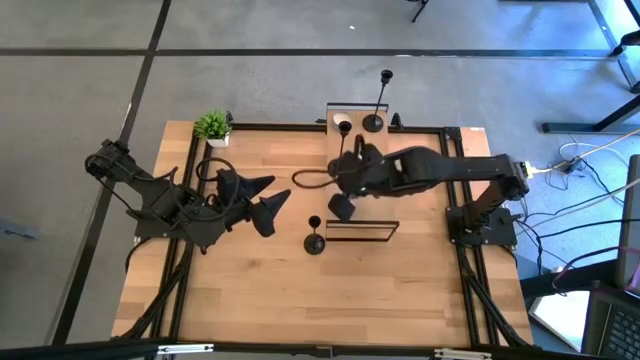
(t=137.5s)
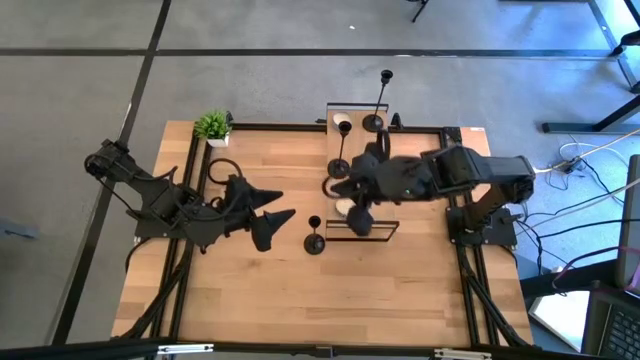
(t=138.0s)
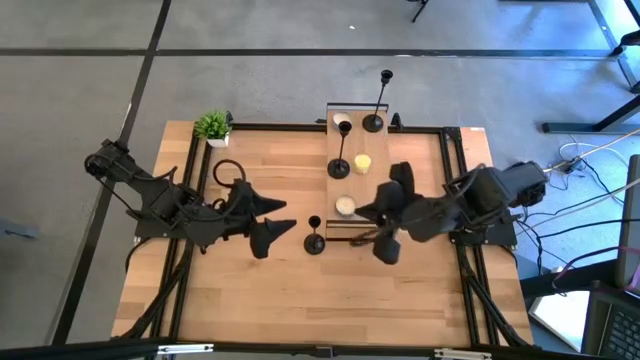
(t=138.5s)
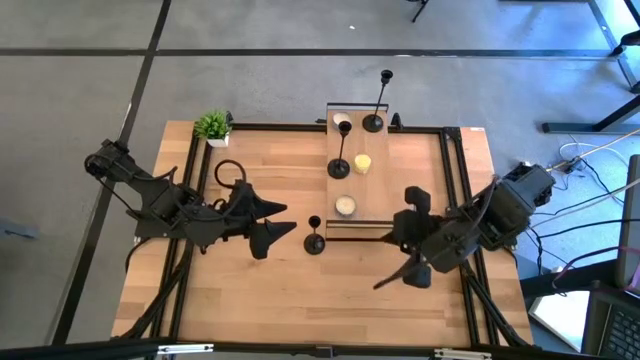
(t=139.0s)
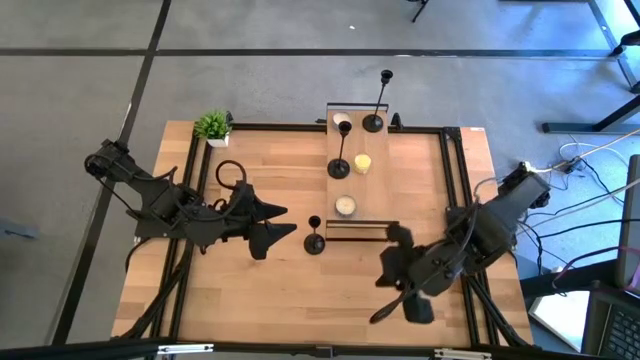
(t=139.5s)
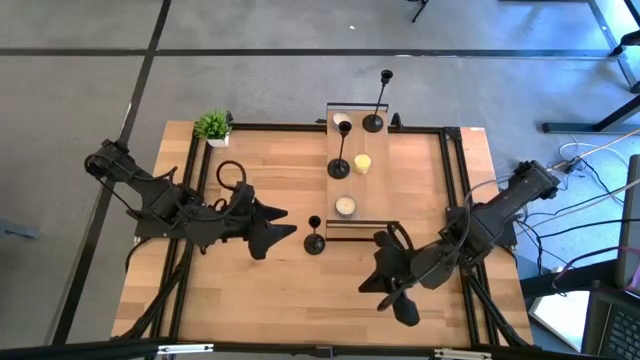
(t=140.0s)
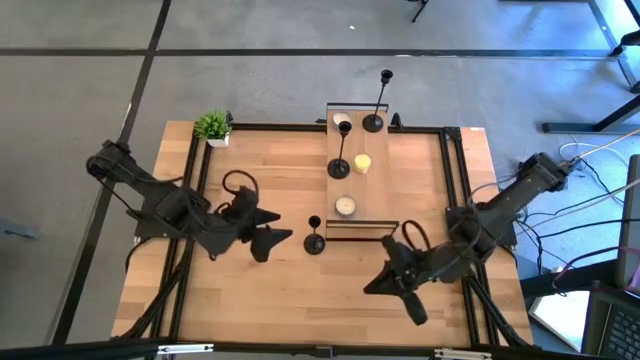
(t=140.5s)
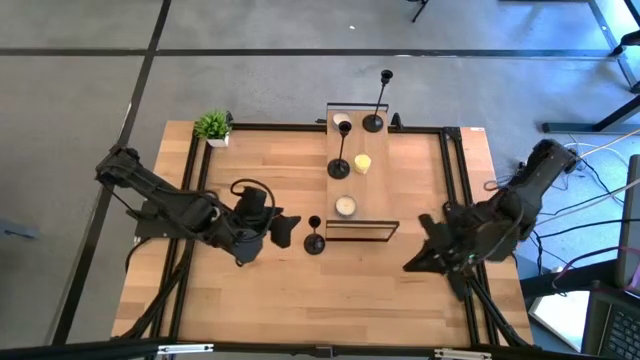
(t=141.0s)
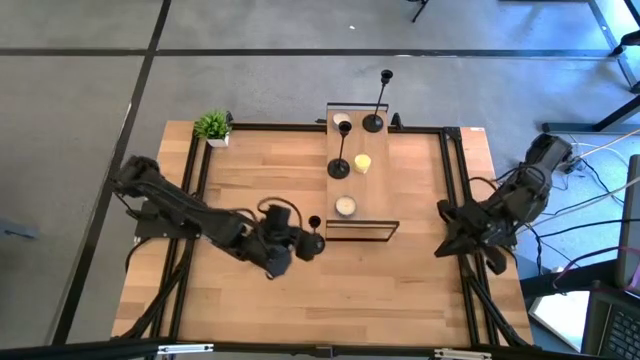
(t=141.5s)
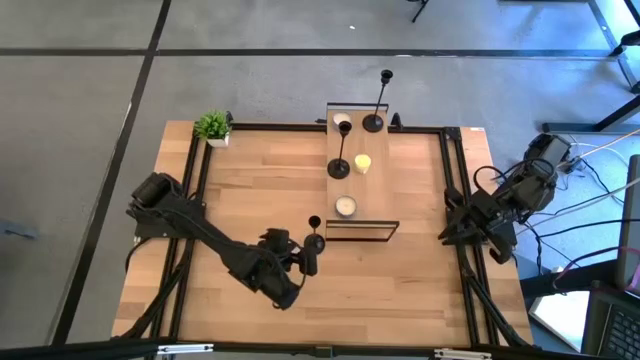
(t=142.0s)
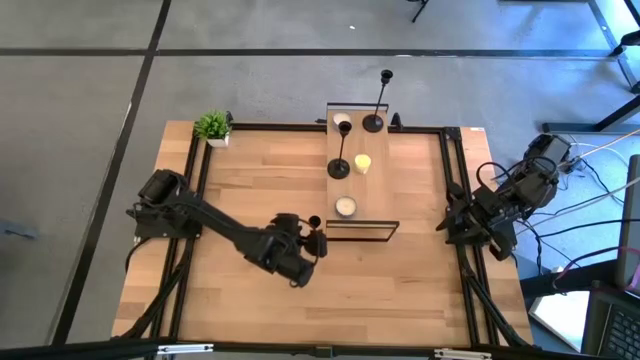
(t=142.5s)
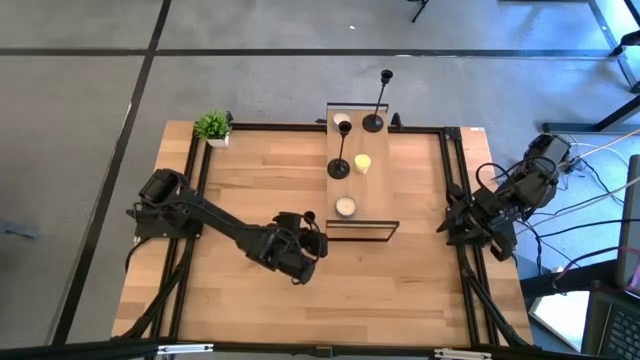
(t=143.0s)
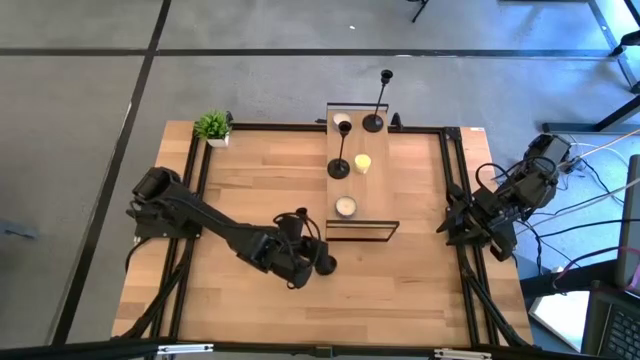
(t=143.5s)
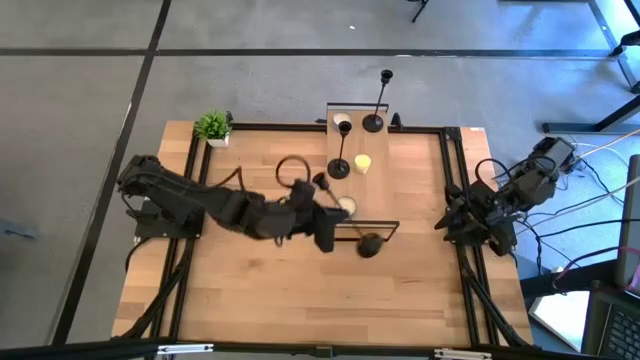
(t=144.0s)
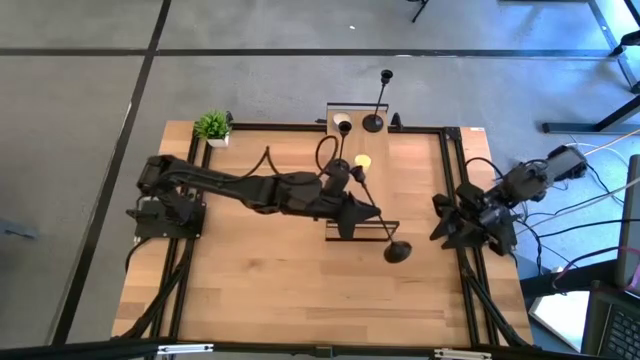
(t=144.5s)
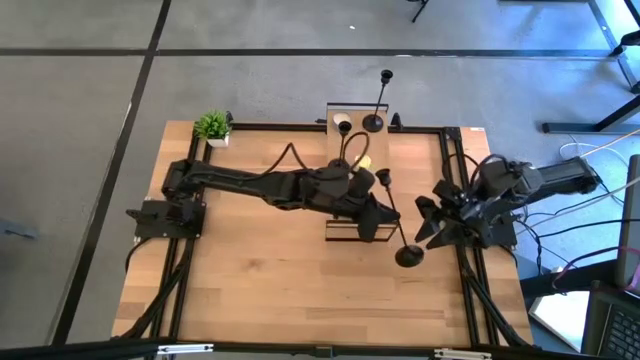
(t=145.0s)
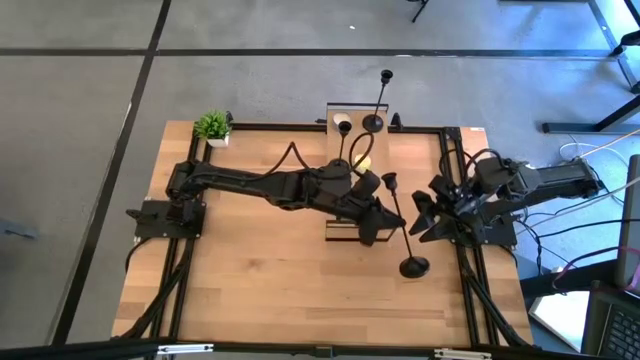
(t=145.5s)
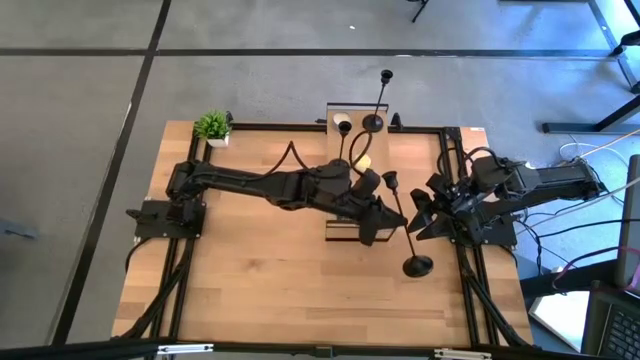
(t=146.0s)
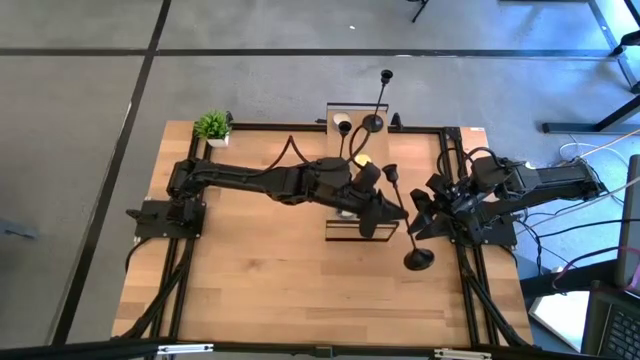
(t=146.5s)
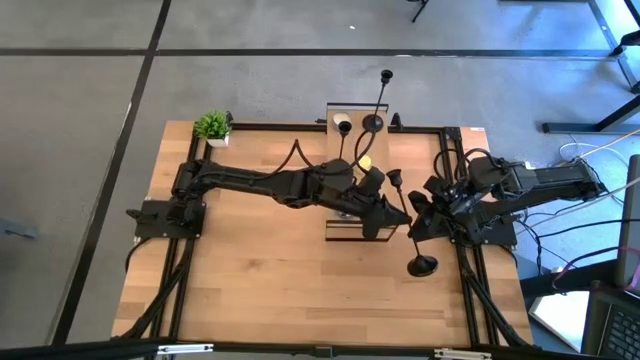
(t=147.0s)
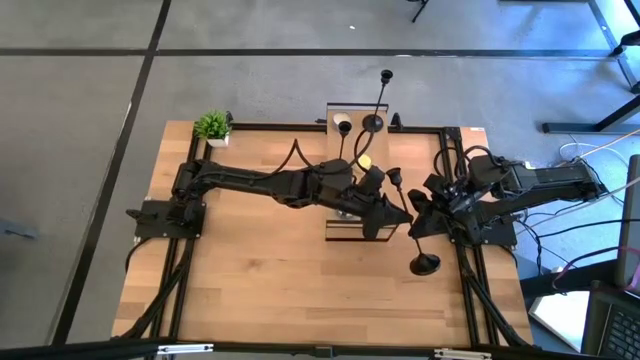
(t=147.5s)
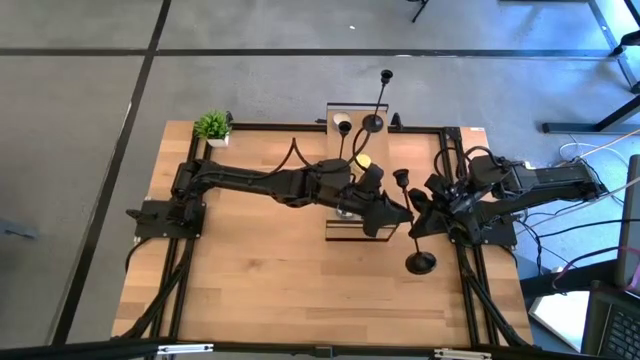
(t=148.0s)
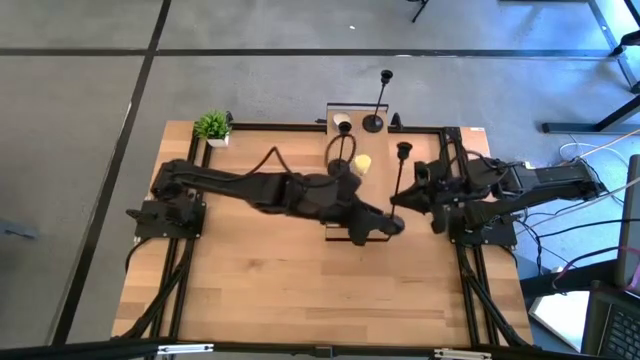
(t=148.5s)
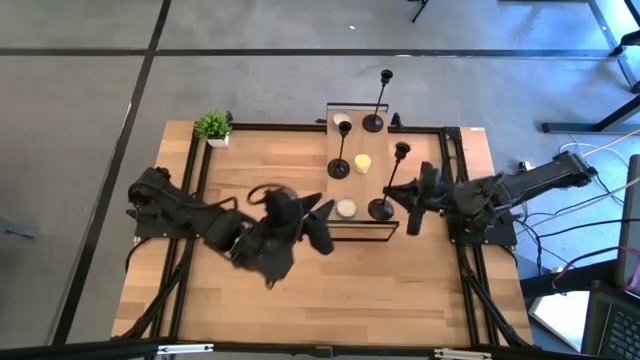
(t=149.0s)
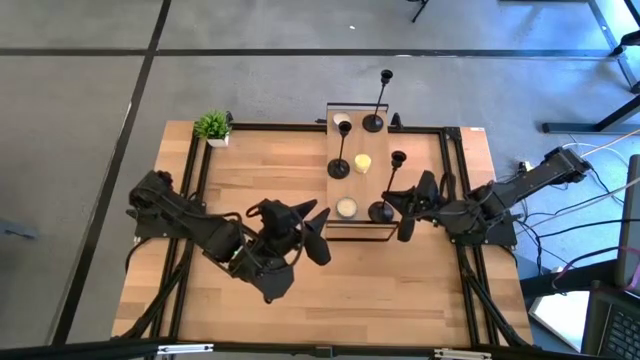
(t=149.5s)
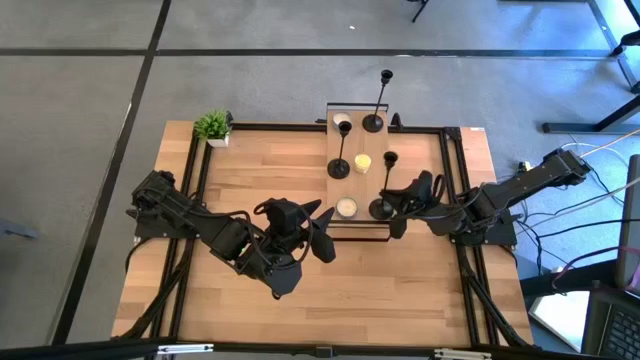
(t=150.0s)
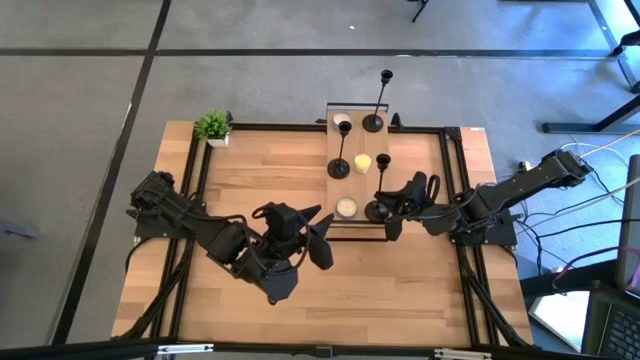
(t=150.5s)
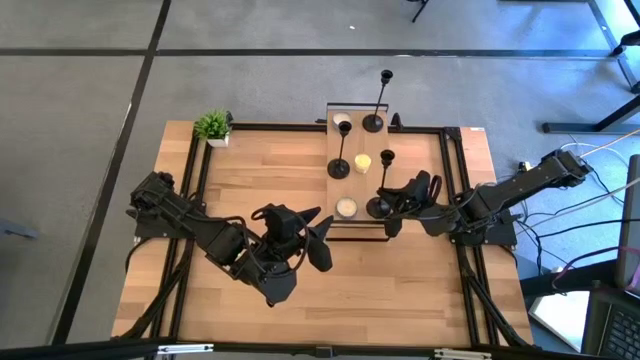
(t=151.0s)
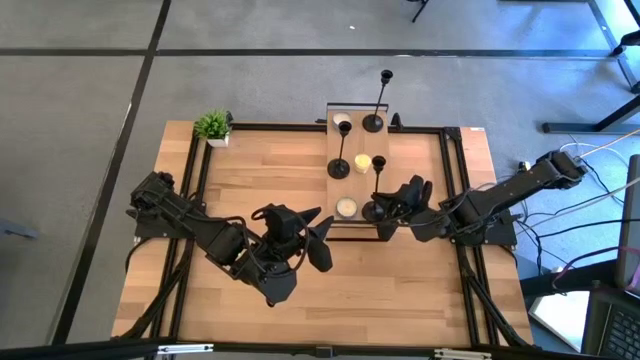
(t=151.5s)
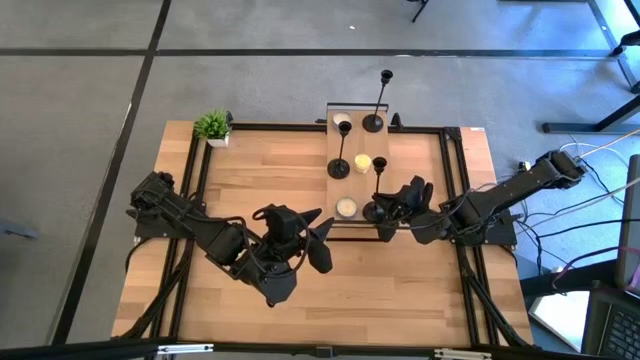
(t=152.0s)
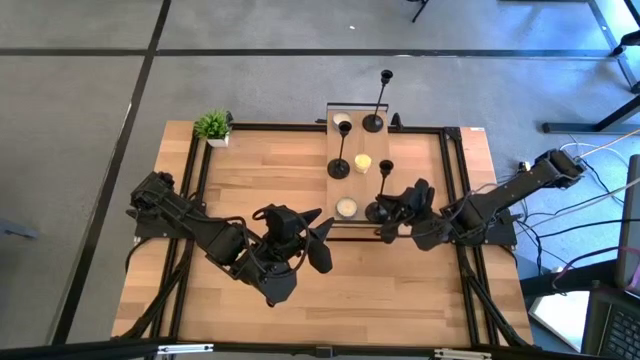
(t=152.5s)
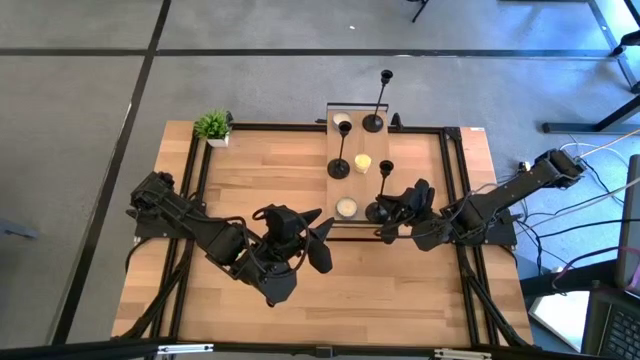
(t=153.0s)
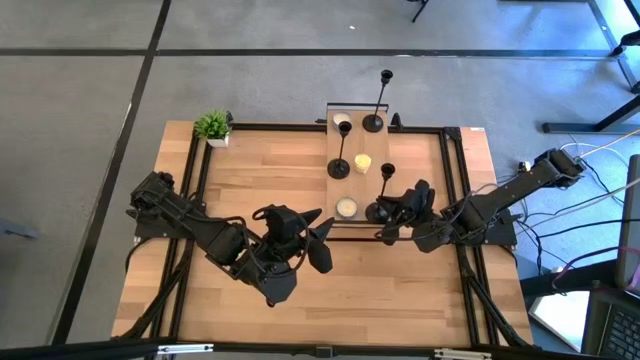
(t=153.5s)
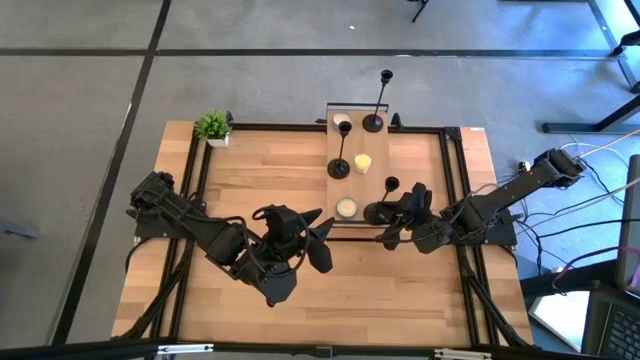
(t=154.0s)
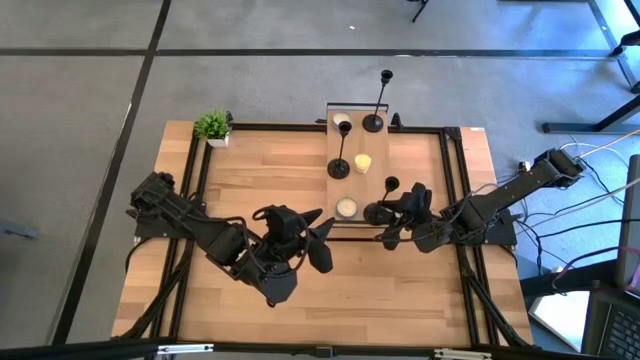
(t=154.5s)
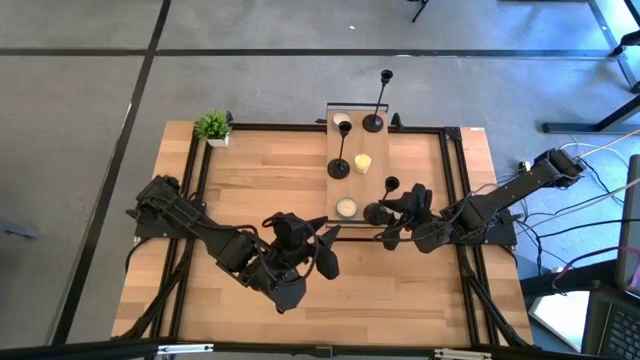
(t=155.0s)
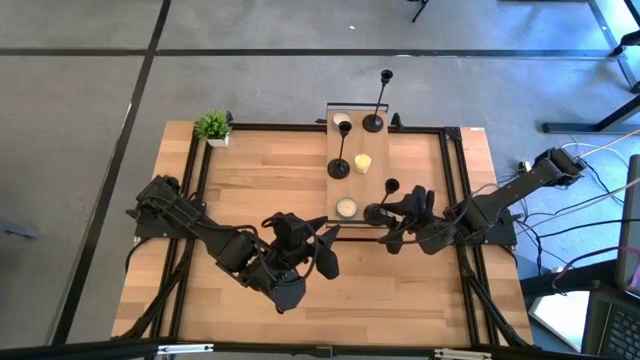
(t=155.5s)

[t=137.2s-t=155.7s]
Task: Pick & Place candle stick holders
Put the black candle holder to the right of the blue candle jar on the shelf

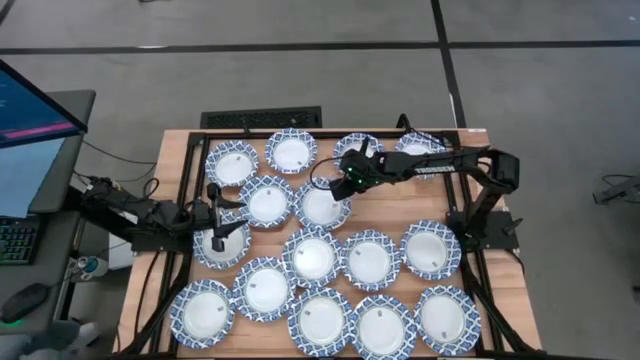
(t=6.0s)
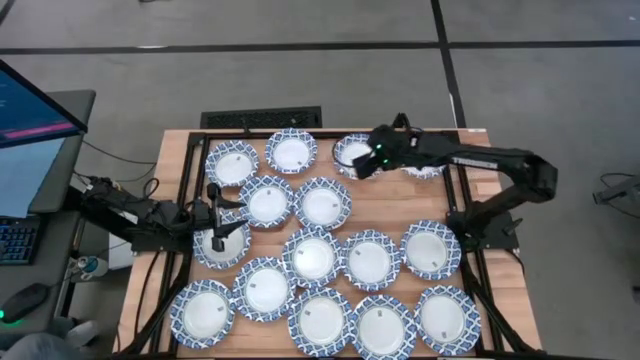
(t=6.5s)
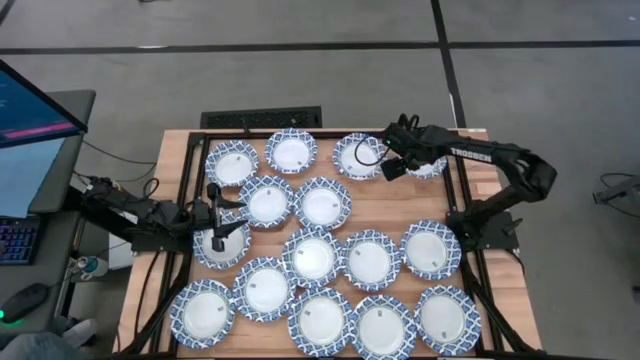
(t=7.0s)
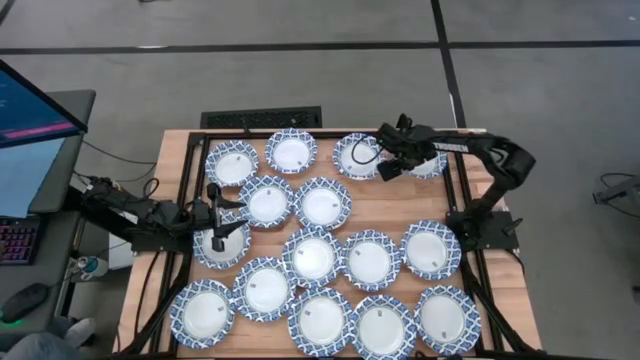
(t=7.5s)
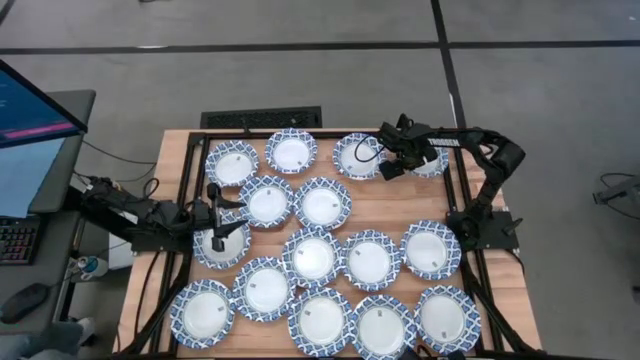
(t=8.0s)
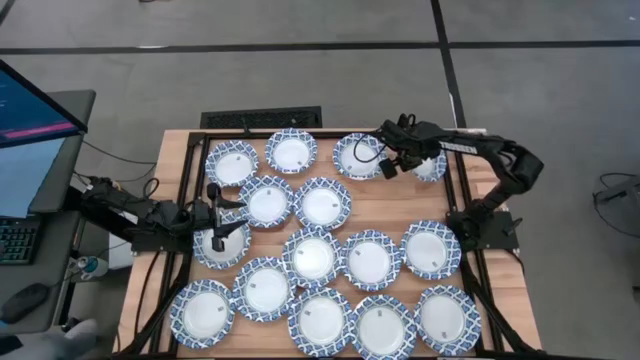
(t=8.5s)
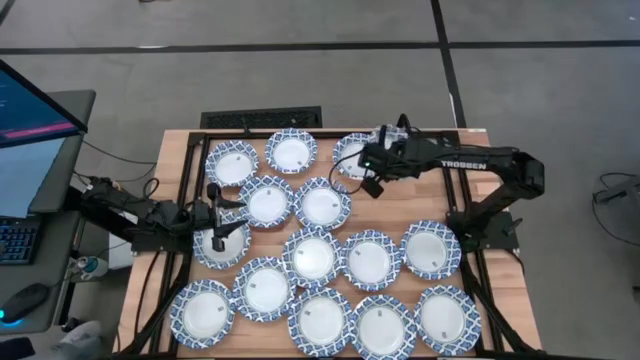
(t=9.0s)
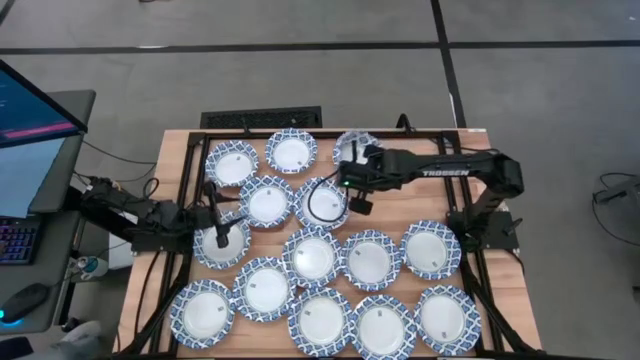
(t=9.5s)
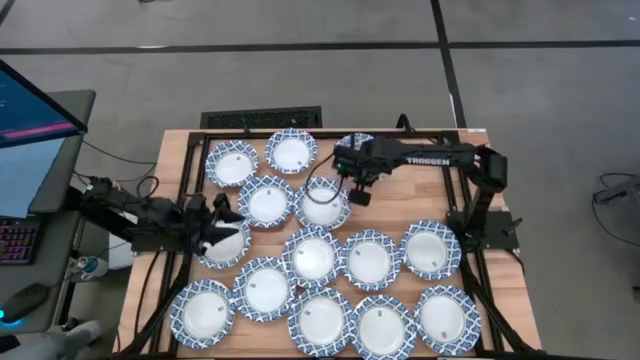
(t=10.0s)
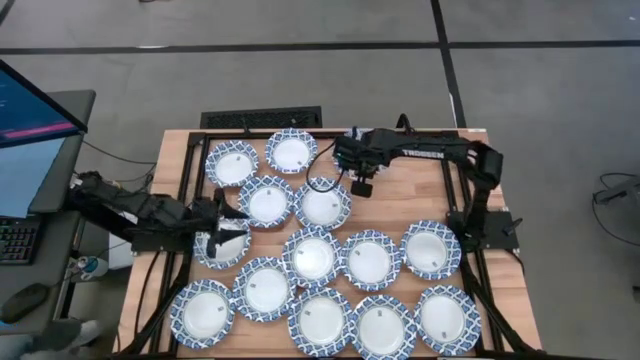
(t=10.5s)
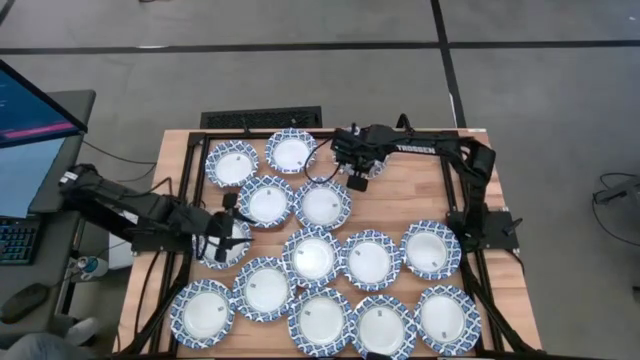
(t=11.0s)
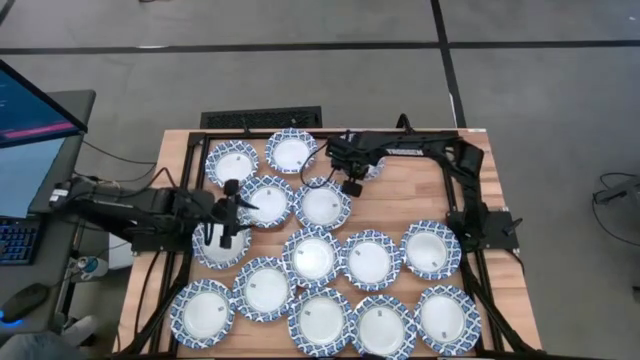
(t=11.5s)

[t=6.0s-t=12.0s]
Task: Nest bowls inside each other
Stack the white bowl on the stacked white bowls
